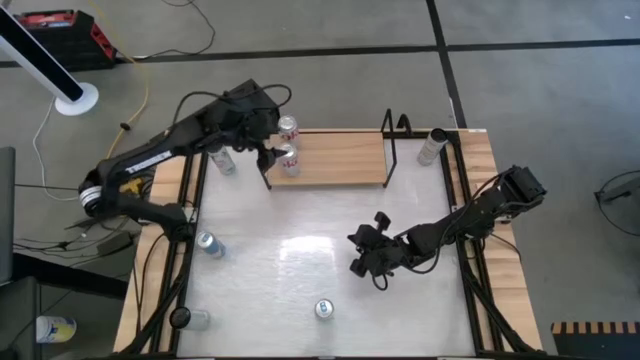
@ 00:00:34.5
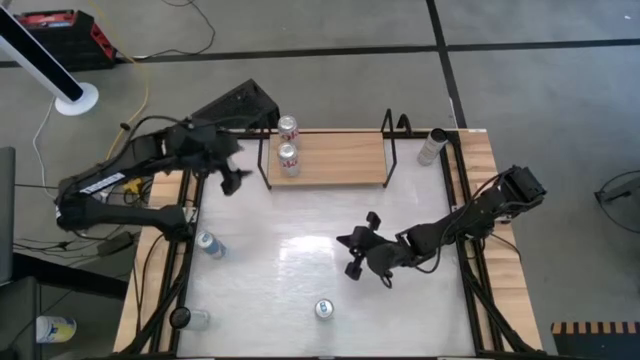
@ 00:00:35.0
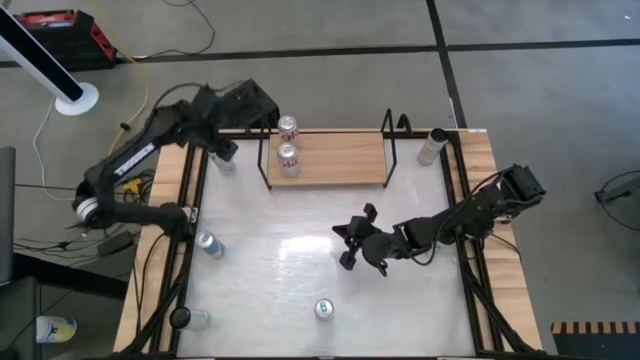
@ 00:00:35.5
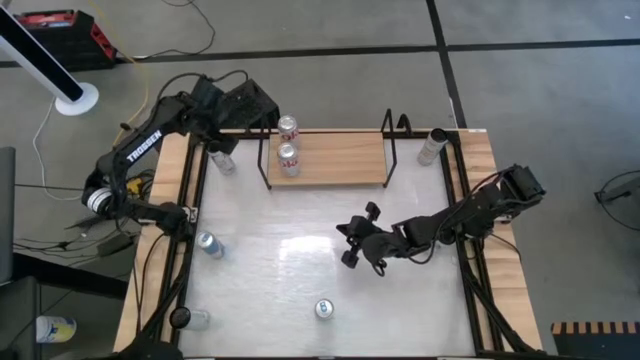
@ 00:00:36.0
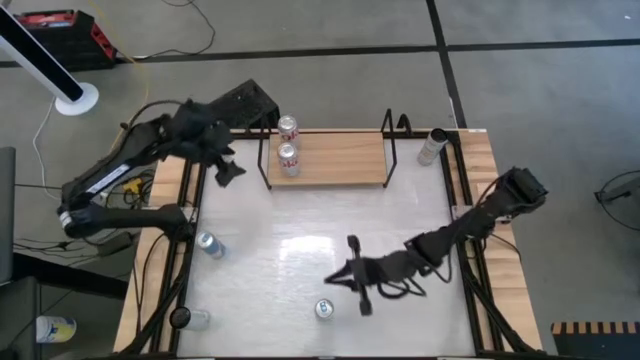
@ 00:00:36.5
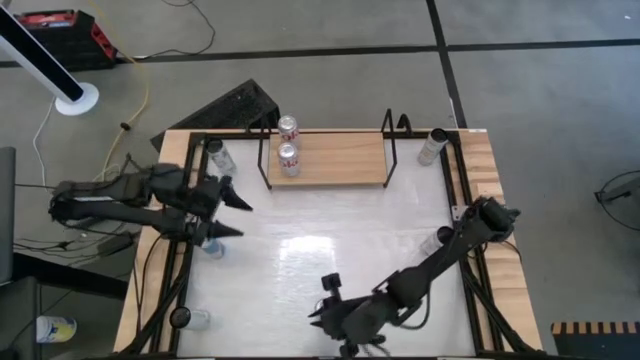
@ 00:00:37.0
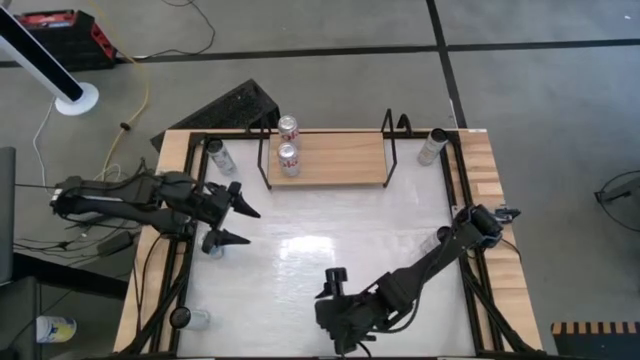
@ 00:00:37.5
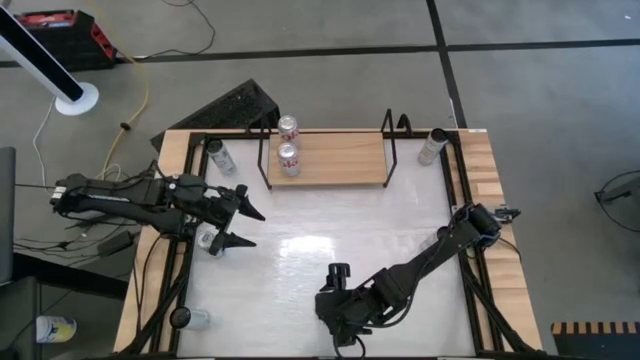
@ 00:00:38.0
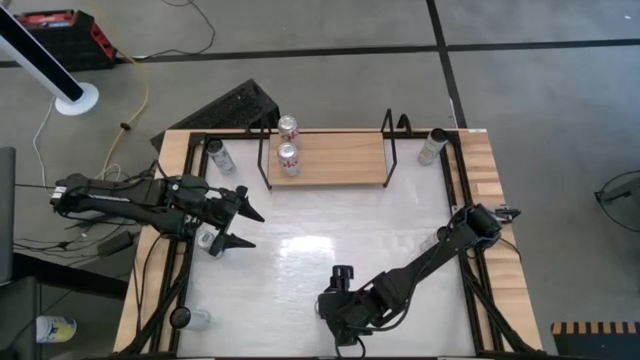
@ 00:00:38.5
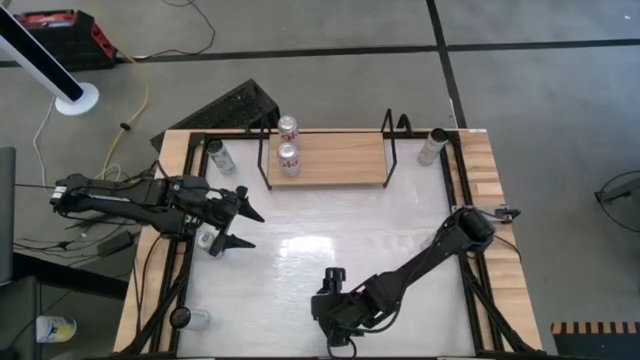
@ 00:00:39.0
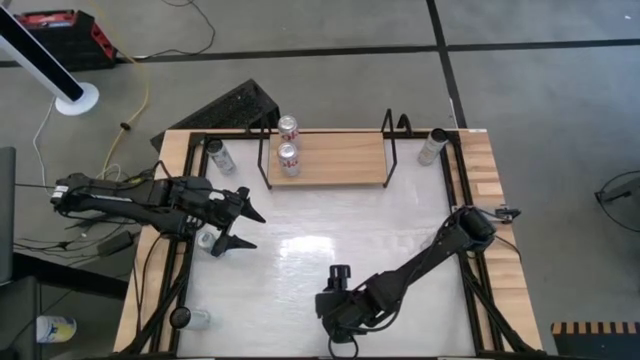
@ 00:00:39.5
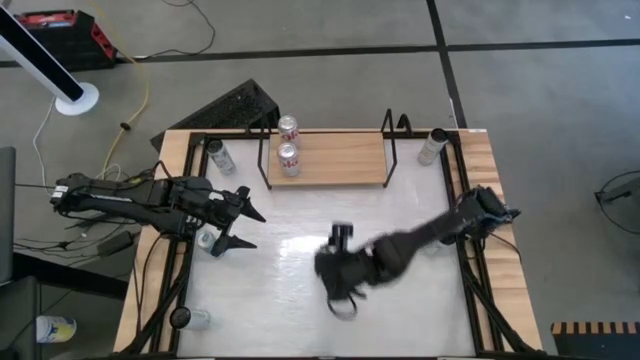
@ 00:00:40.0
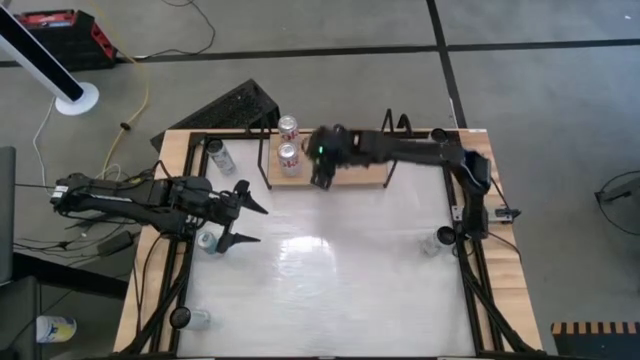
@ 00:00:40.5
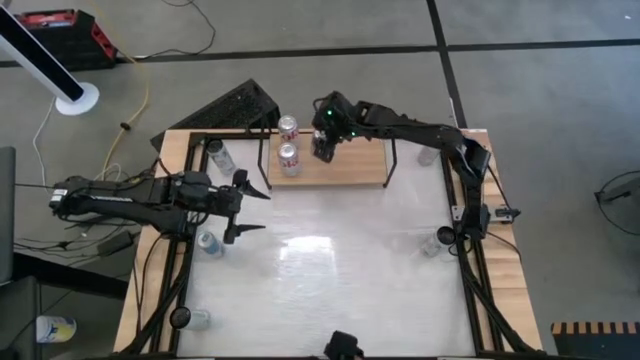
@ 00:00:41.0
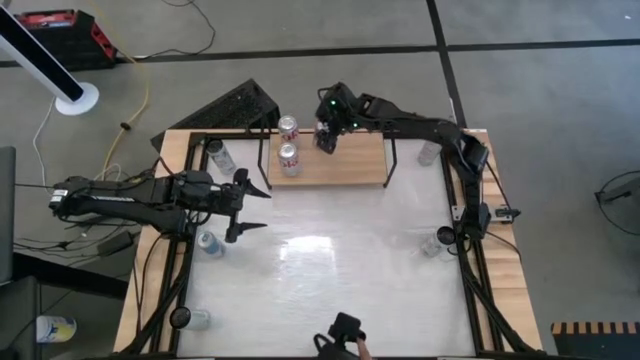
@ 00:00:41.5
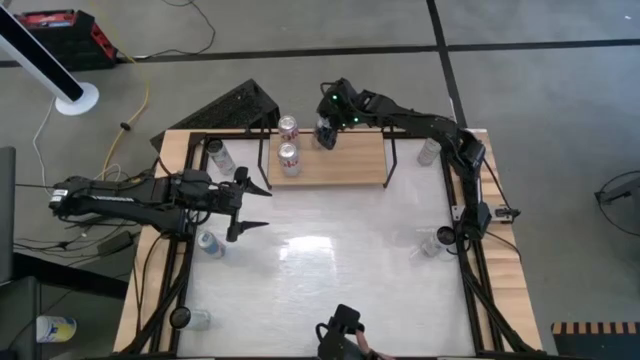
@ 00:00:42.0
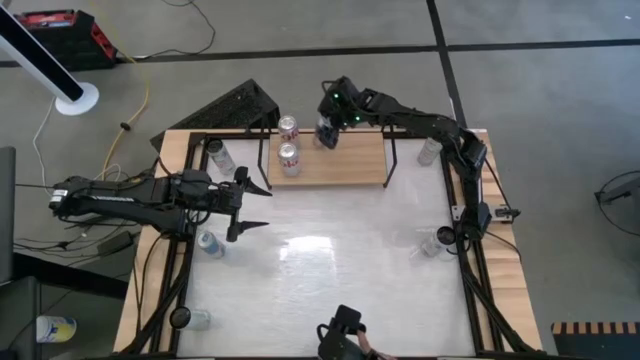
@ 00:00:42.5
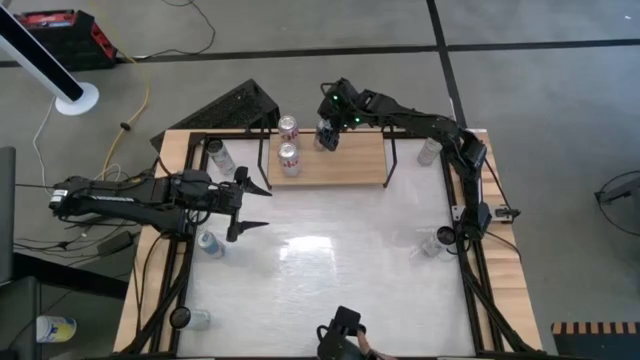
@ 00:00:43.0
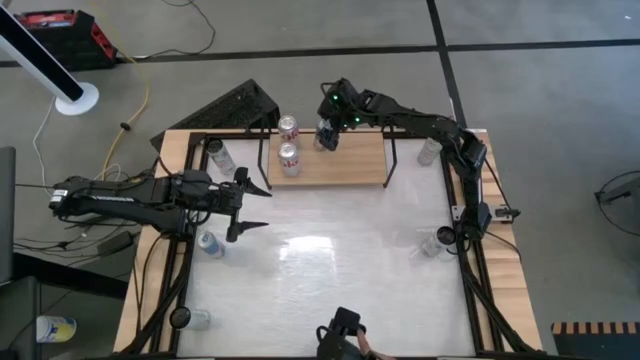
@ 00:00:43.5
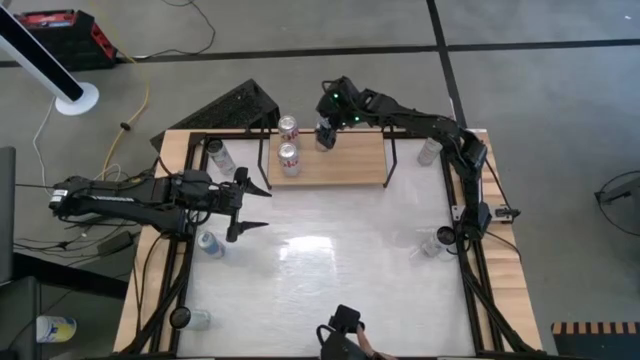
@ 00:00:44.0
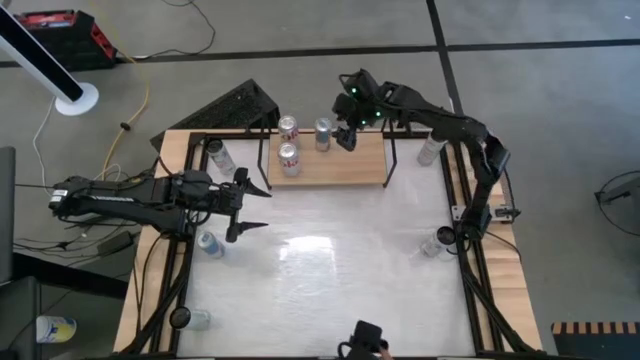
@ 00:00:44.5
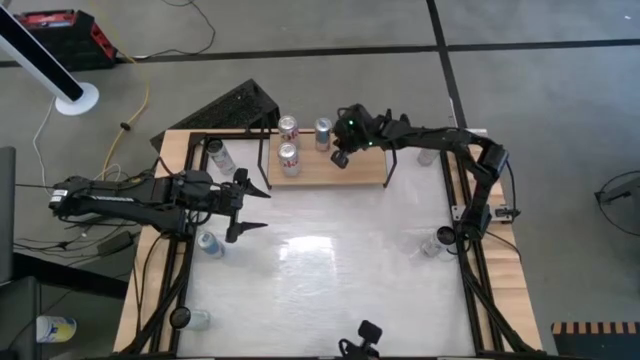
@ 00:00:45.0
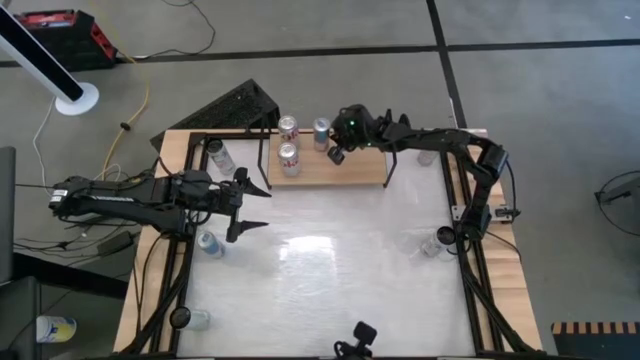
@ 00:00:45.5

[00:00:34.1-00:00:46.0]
Task: Place canned beverage on shelf
Put the right blue soda can on the shelf

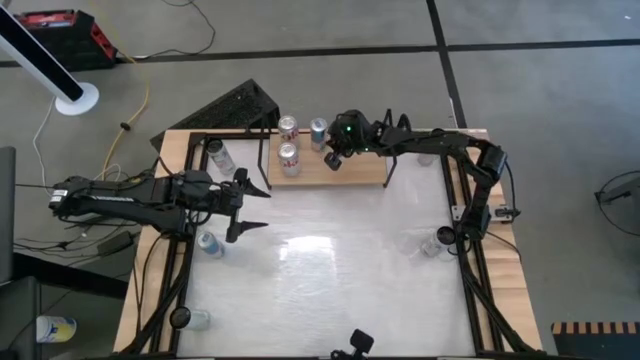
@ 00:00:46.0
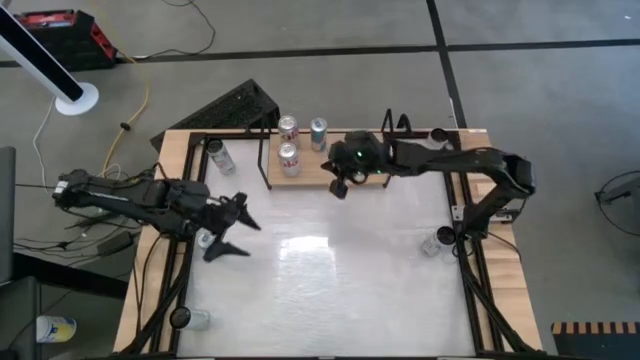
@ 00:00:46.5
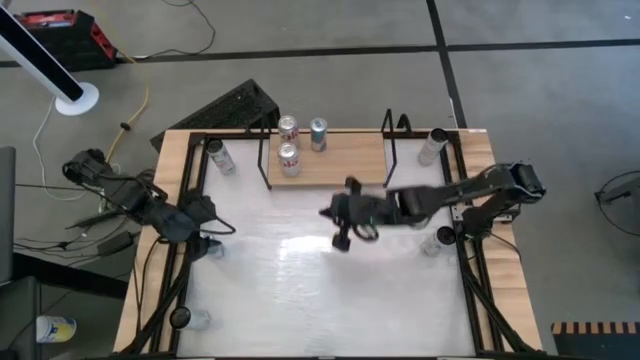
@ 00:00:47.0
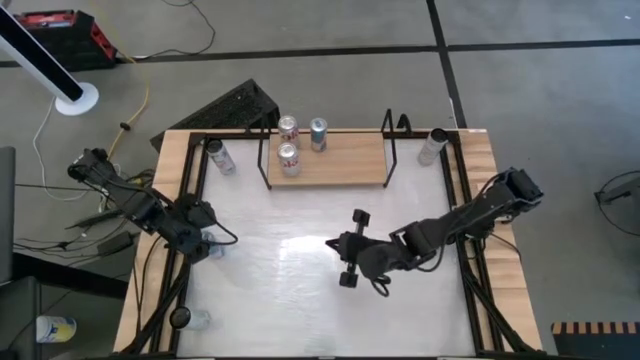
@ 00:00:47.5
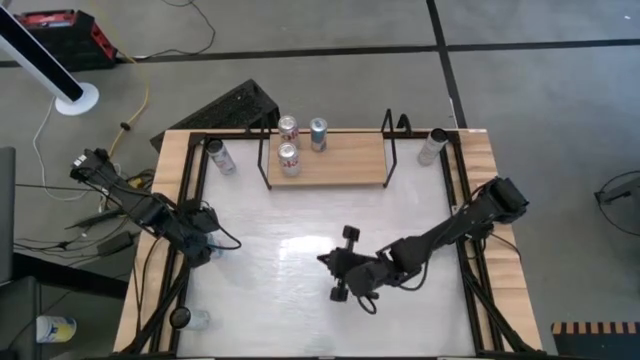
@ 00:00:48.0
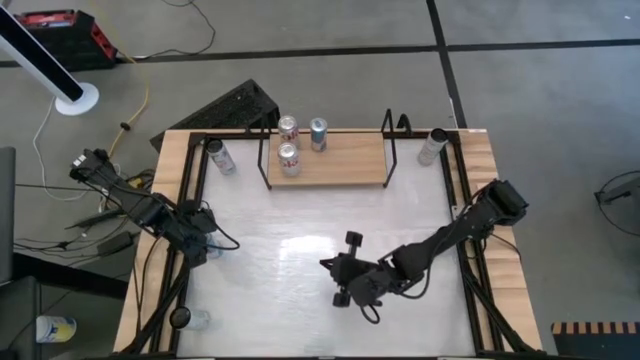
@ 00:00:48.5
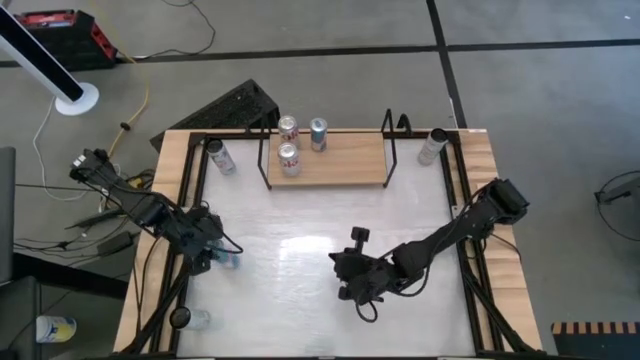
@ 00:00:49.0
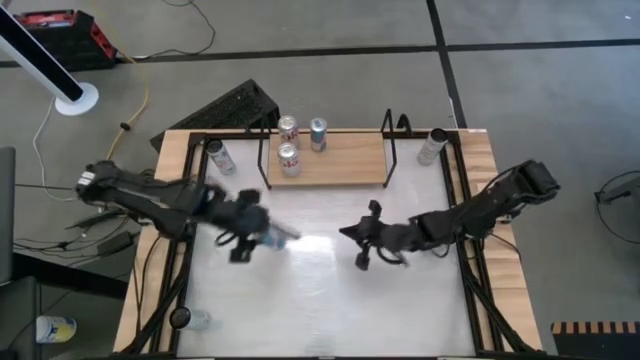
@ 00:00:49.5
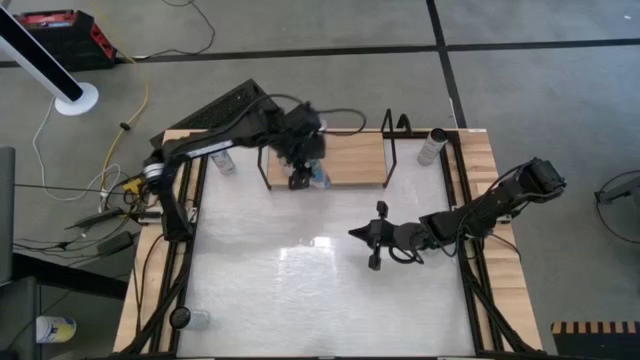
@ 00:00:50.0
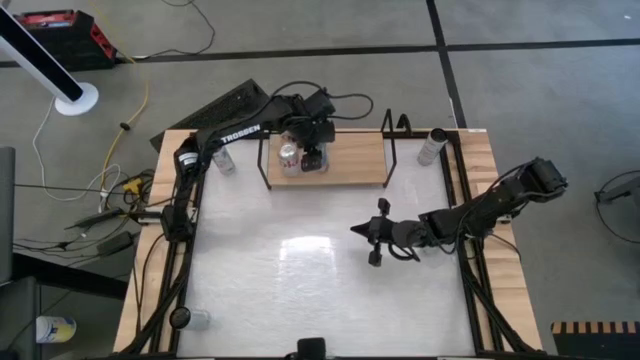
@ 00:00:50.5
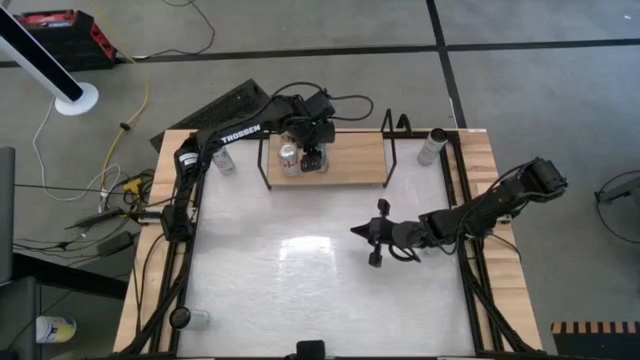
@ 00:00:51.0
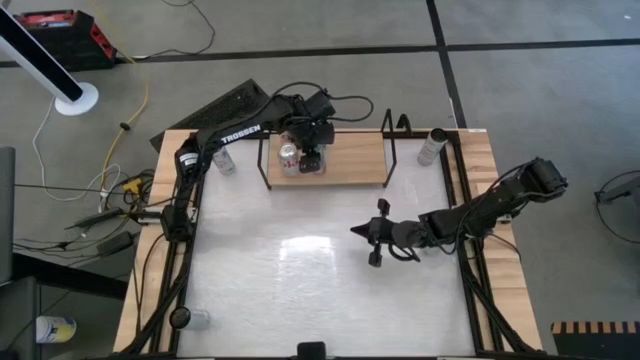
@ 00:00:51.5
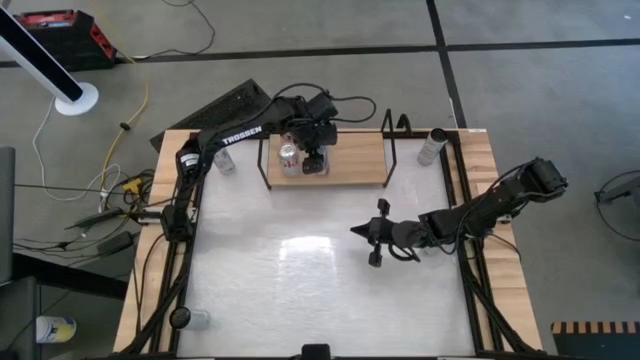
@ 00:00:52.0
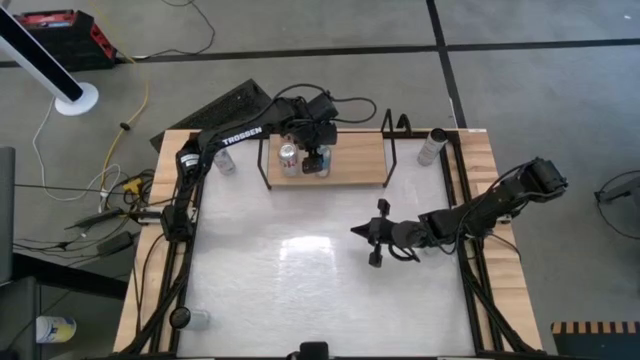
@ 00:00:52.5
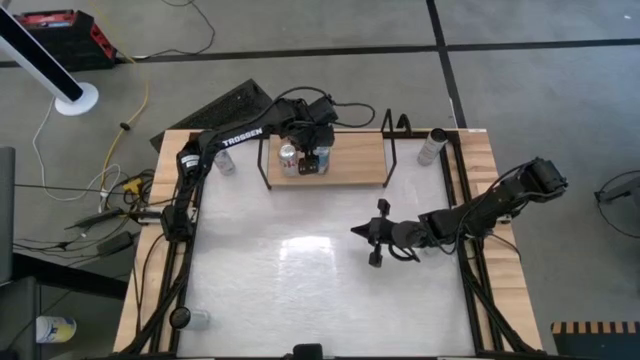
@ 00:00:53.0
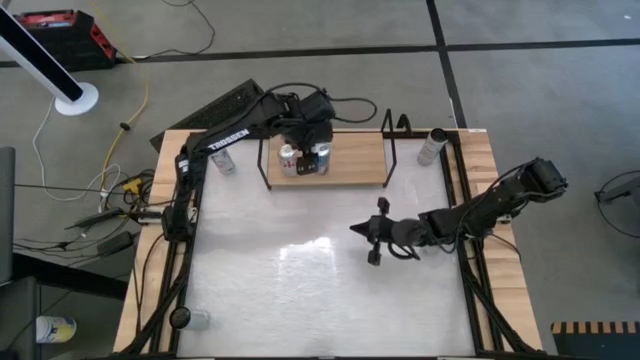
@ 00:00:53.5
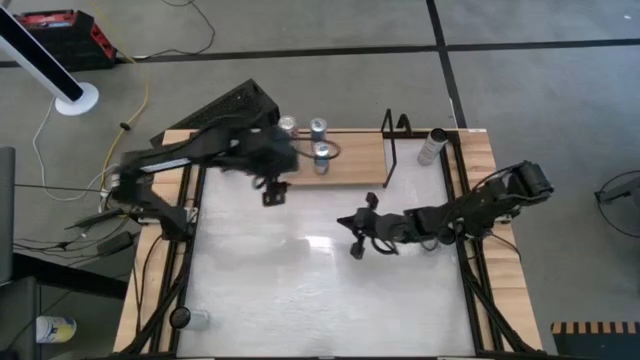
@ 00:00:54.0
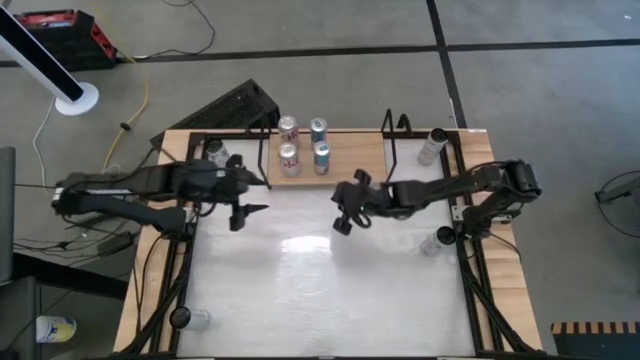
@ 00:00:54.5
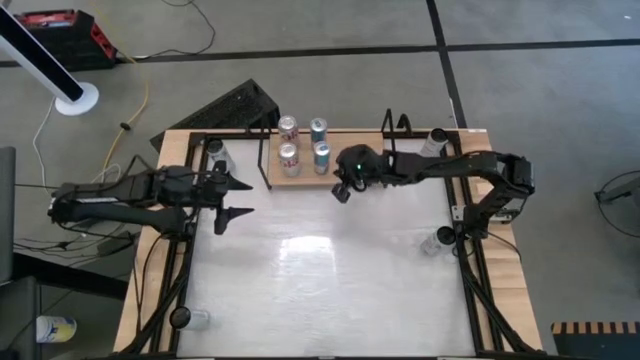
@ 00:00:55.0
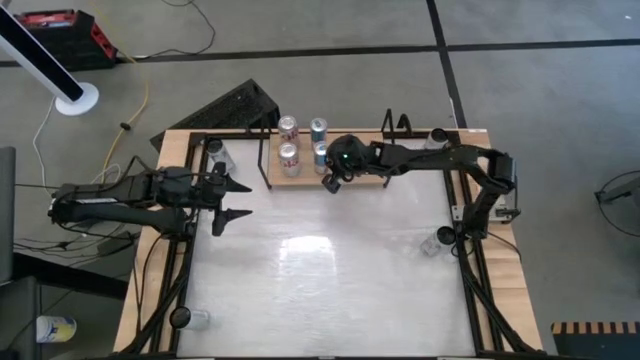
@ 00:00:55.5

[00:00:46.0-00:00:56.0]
Put the blue soda can on the shelf aligned with the other blue soda can
